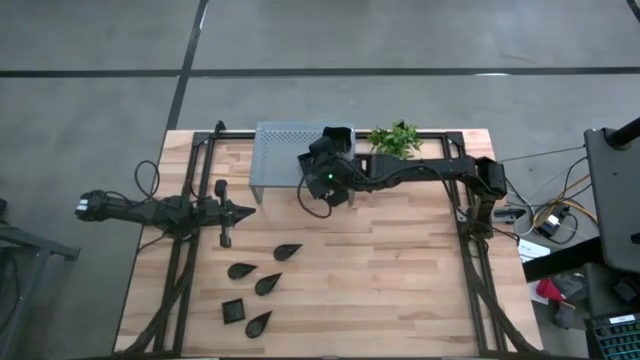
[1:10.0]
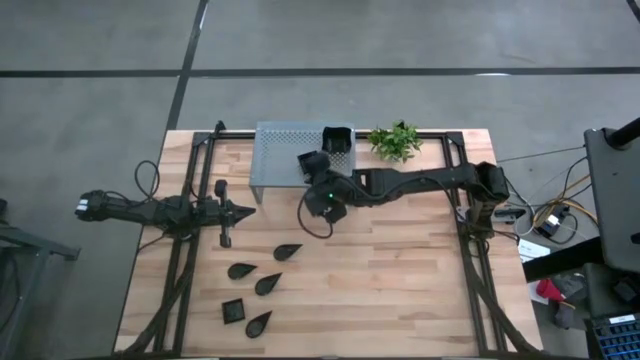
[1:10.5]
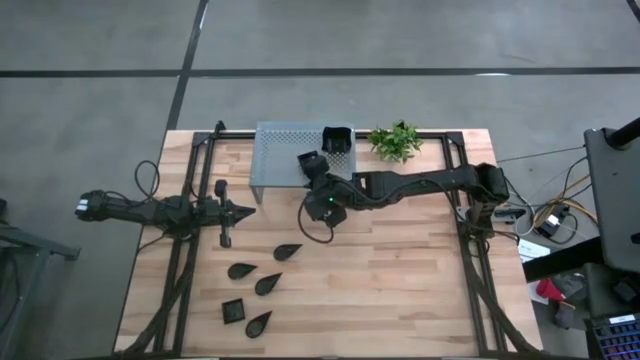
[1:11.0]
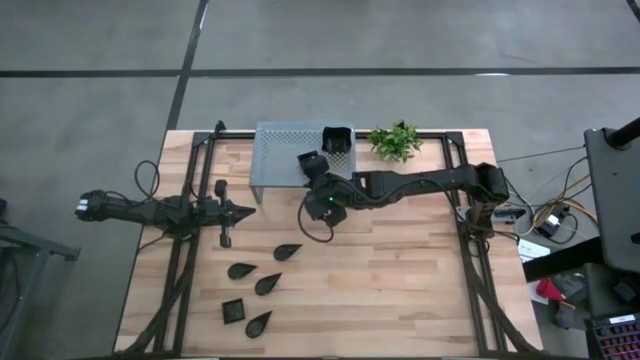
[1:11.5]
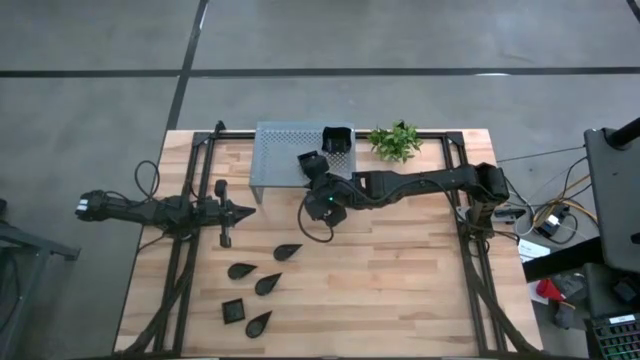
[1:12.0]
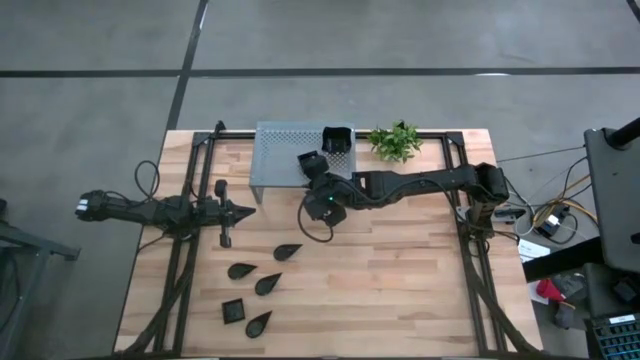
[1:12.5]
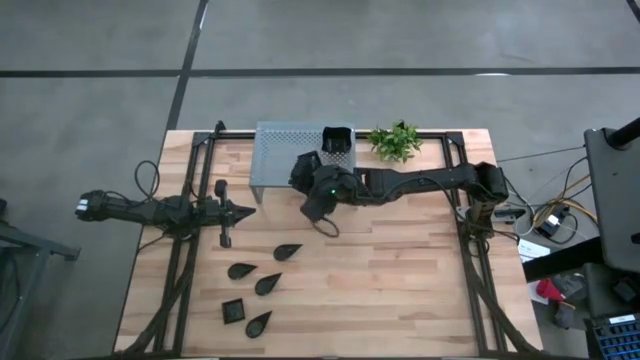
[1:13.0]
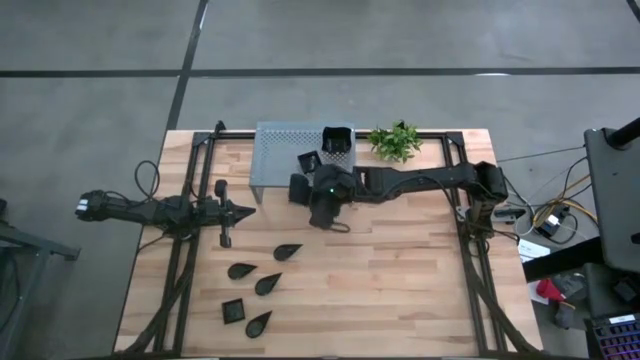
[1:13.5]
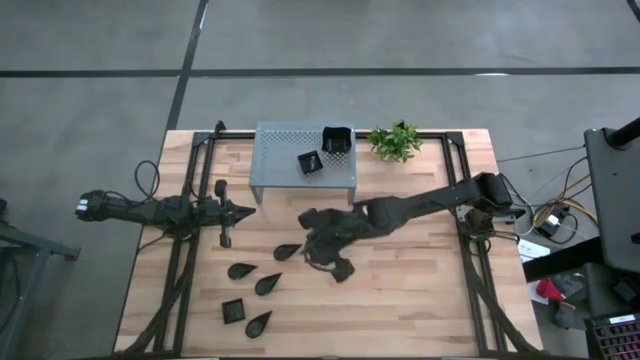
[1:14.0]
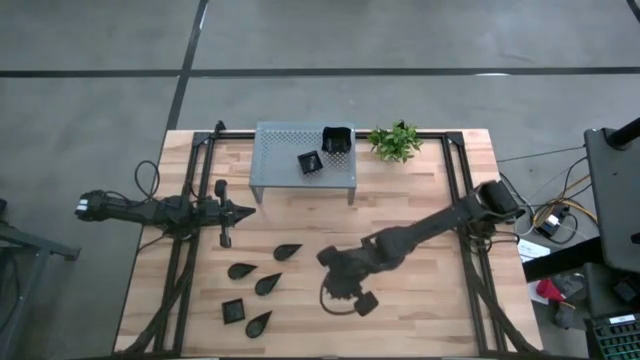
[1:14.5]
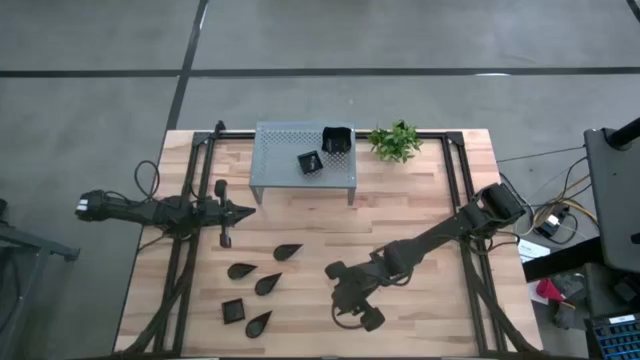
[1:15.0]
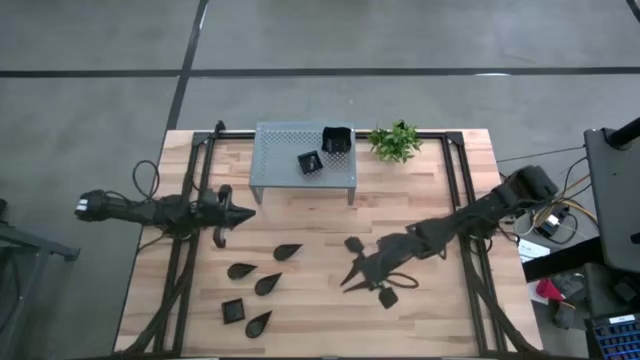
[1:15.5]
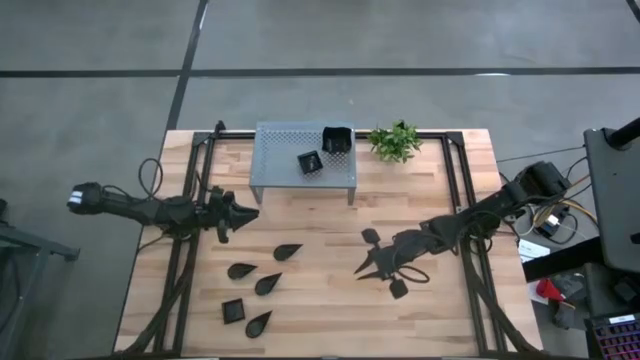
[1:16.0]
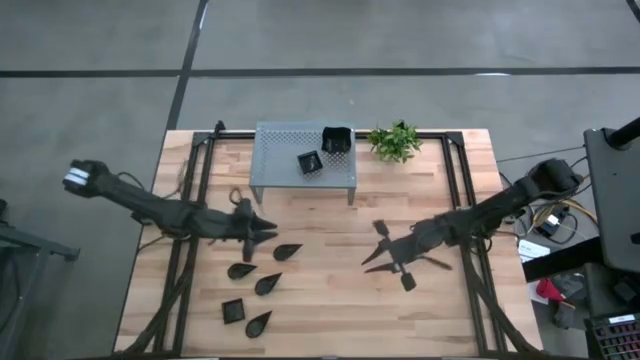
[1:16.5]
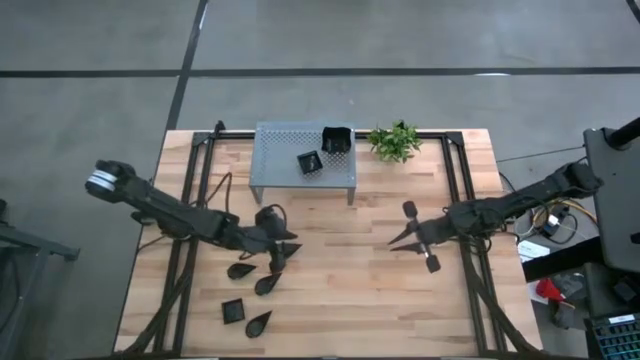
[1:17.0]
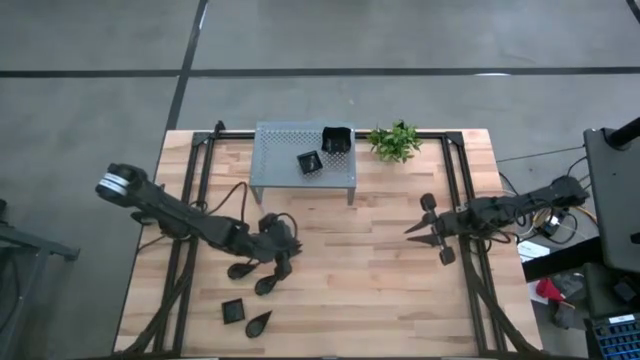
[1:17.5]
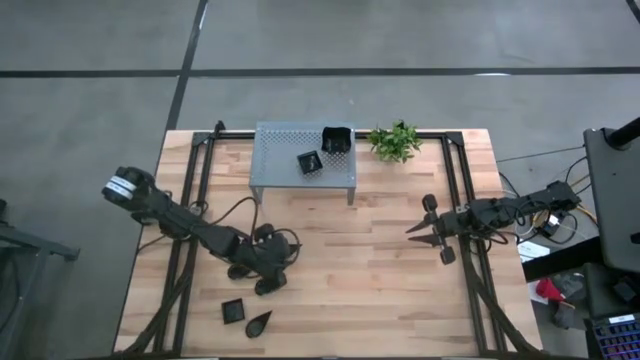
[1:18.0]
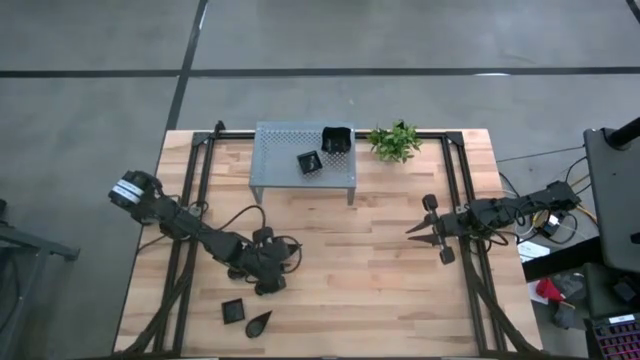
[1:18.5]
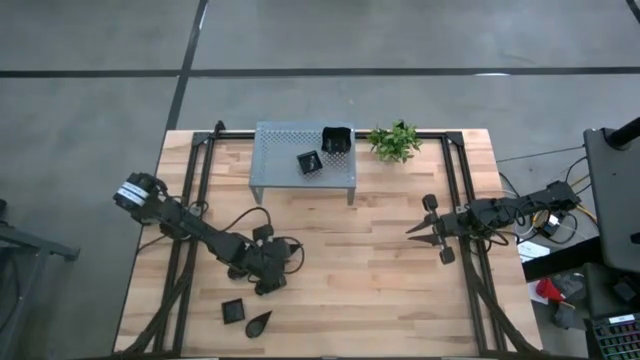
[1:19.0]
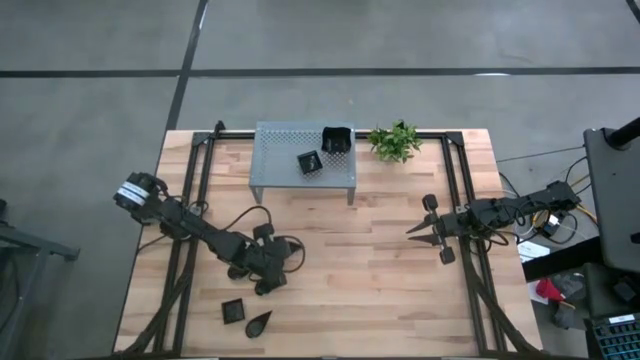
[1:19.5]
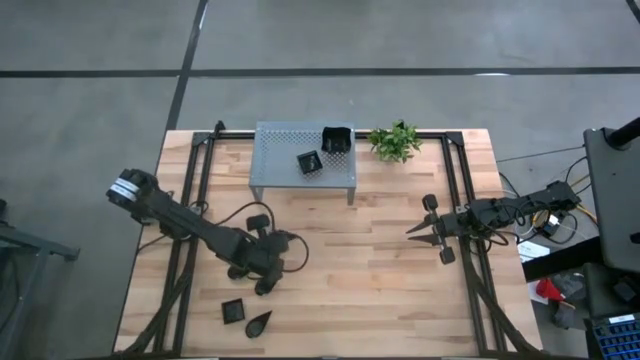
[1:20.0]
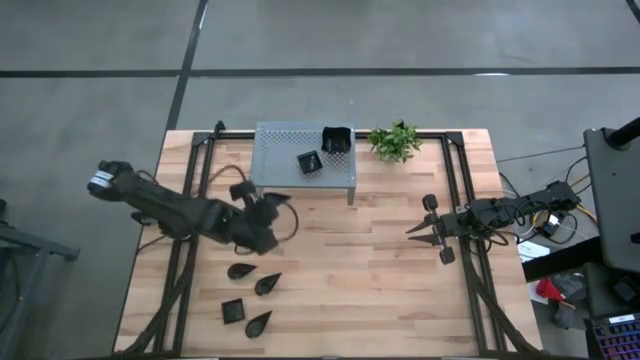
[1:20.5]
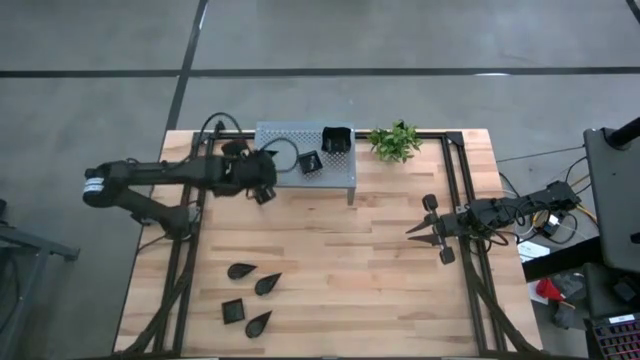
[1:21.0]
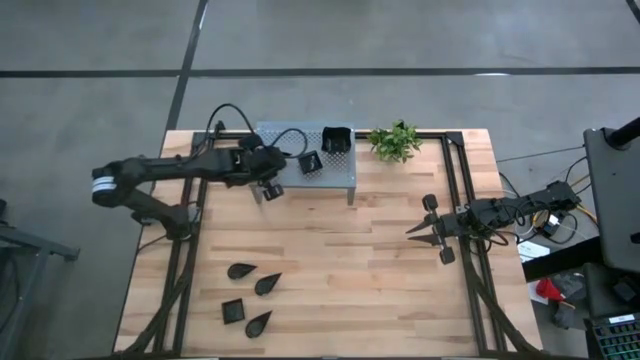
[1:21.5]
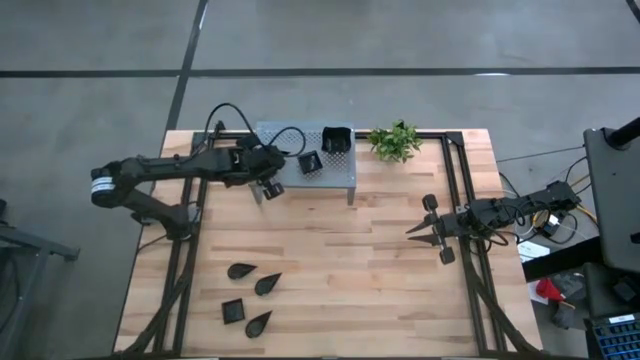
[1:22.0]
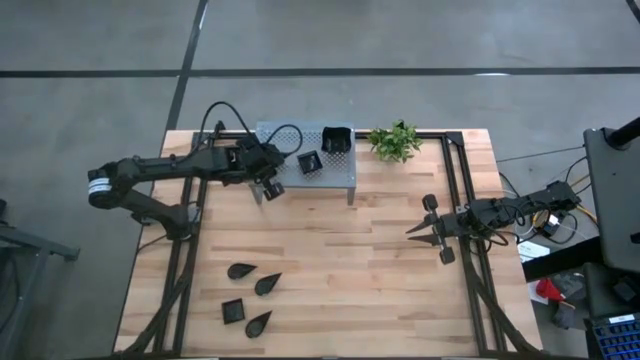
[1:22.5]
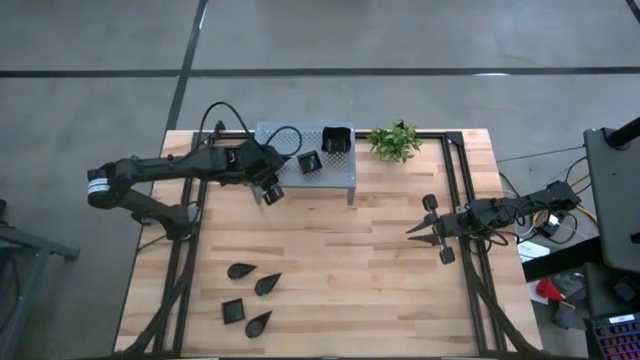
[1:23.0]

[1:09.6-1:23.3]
Task: Pick & Place Mini shaped plates
Put the black drop-shaped plate on the shelf

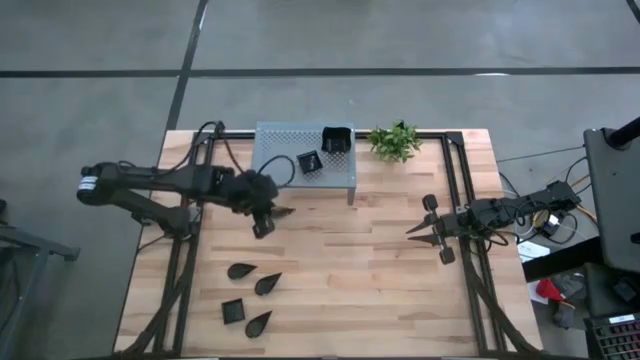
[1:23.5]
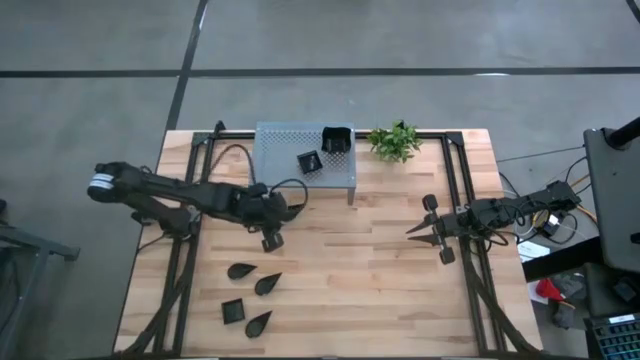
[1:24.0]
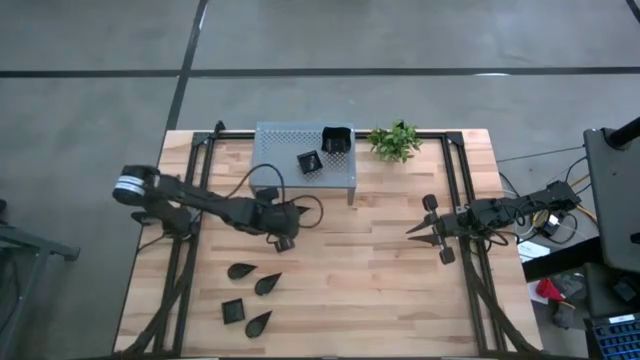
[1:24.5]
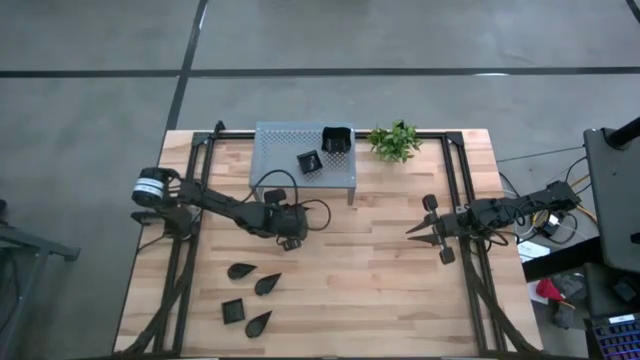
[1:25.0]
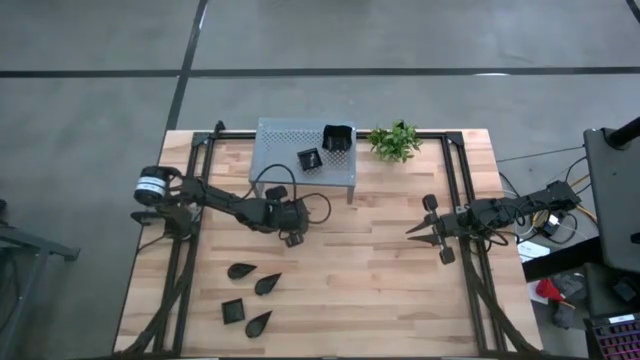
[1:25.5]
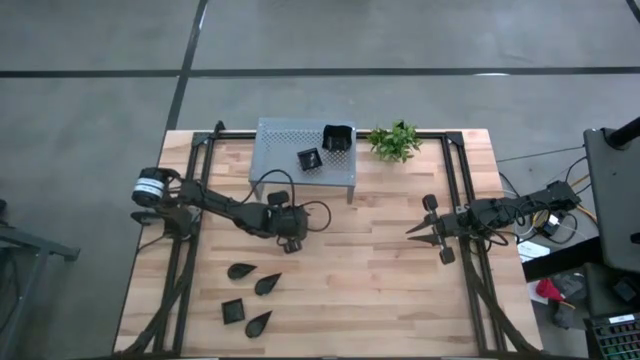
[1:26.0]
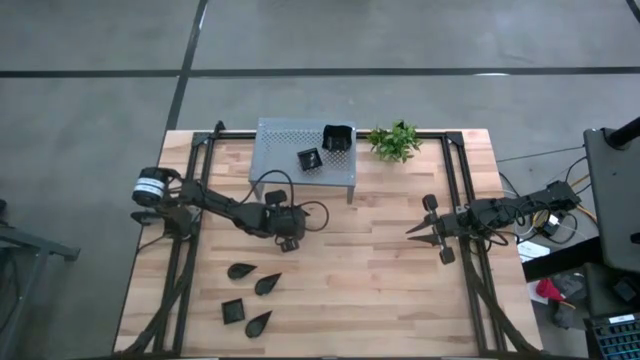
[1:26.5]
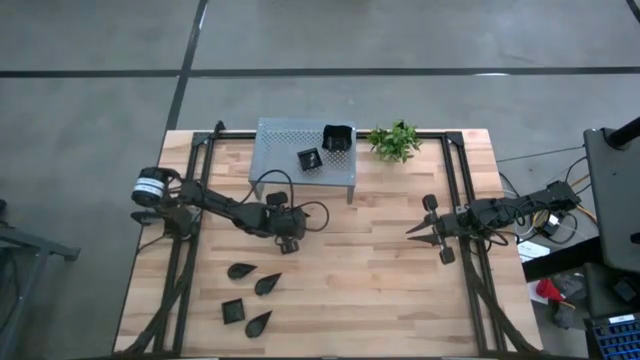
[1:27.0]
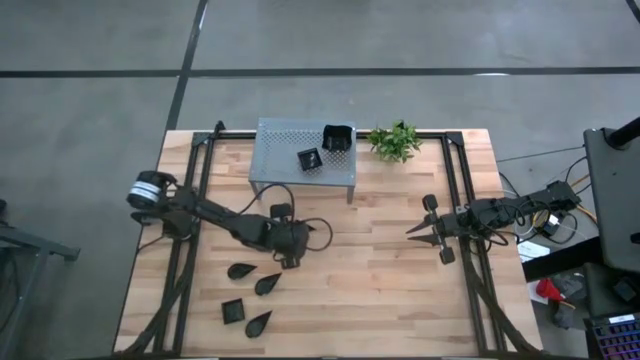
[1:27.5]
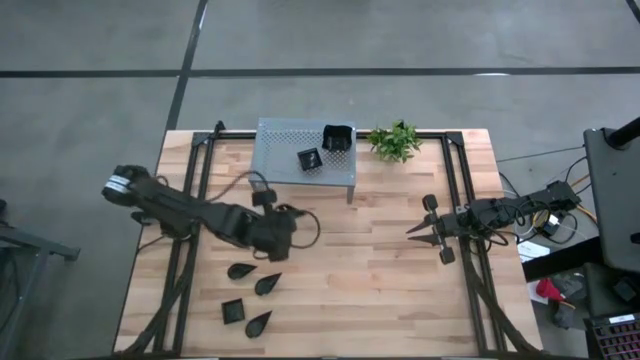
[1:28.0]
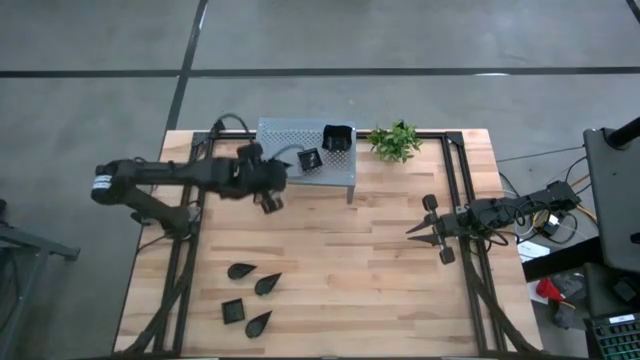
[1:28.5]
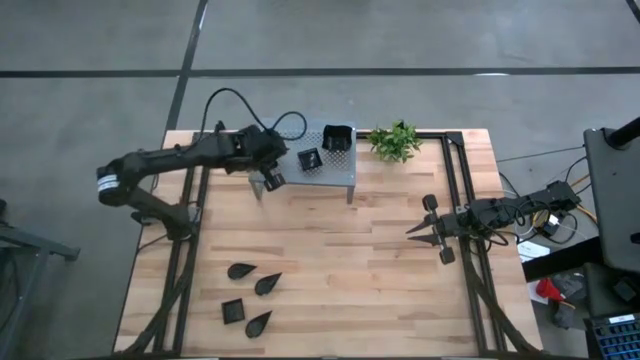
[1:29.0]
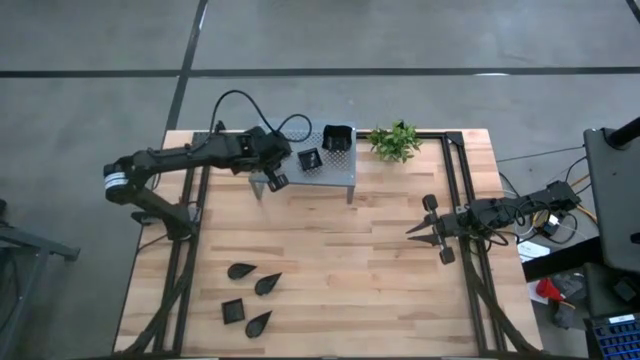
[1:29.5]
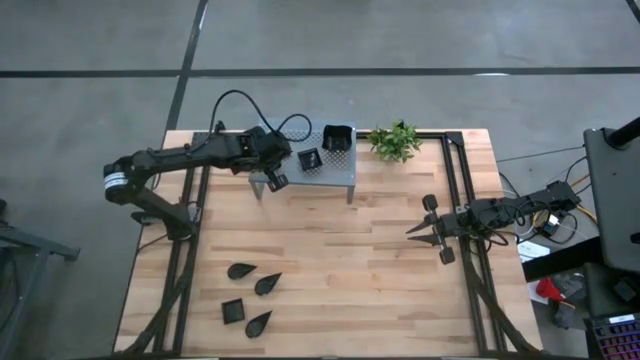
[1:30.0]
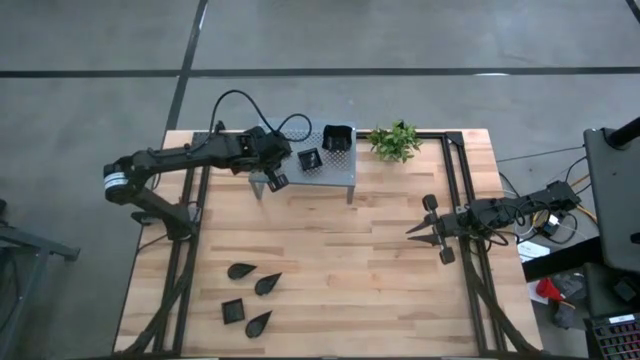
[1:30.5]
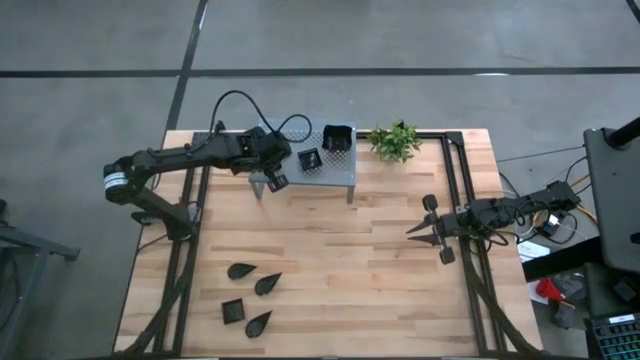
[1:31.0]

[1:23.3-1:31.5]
Put the black drop-shaped plate on the shelf
